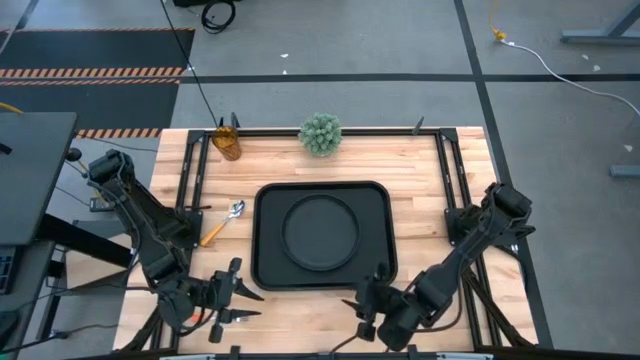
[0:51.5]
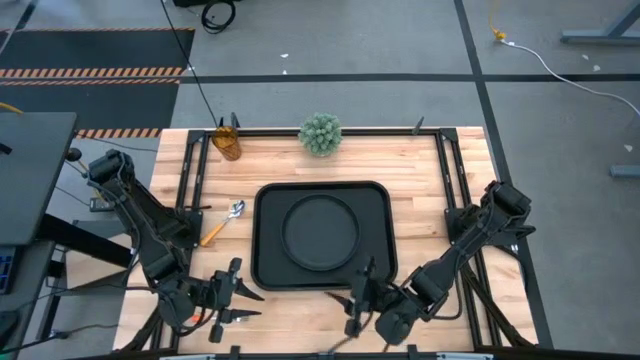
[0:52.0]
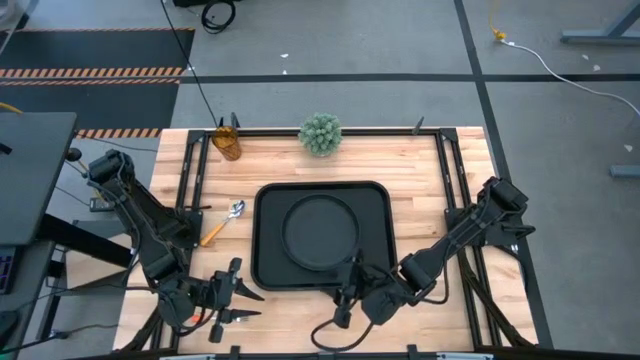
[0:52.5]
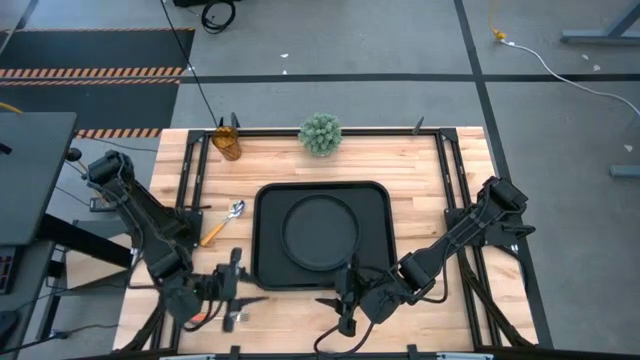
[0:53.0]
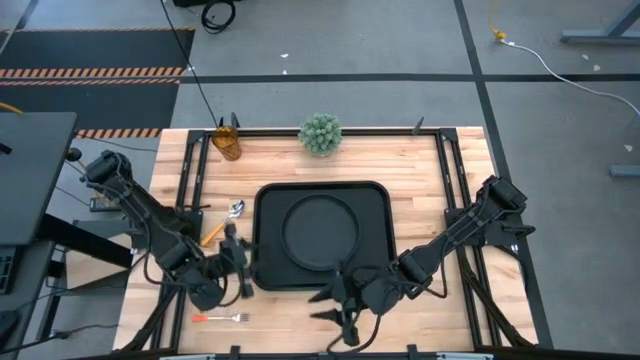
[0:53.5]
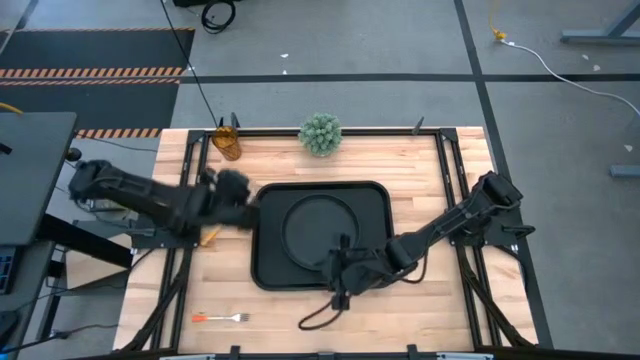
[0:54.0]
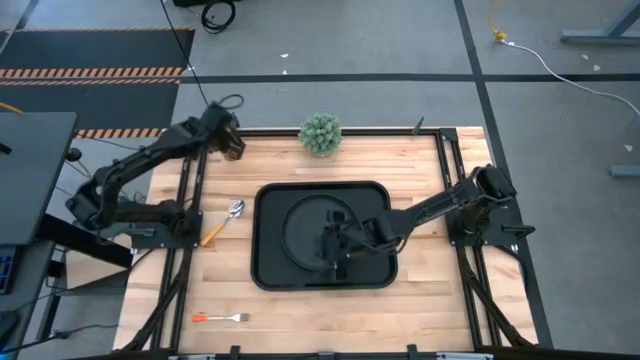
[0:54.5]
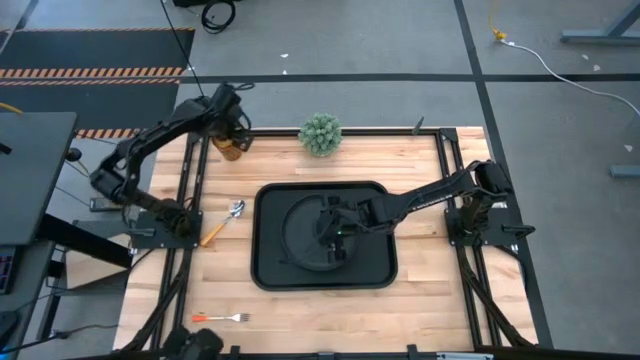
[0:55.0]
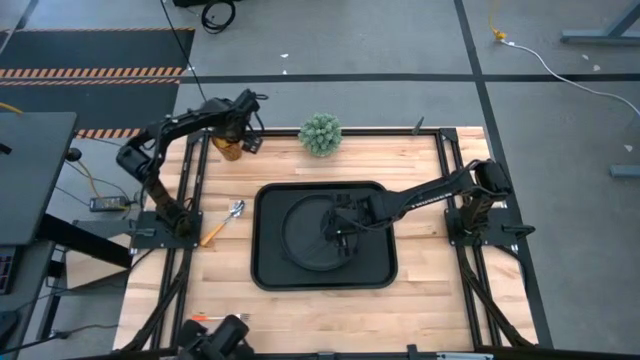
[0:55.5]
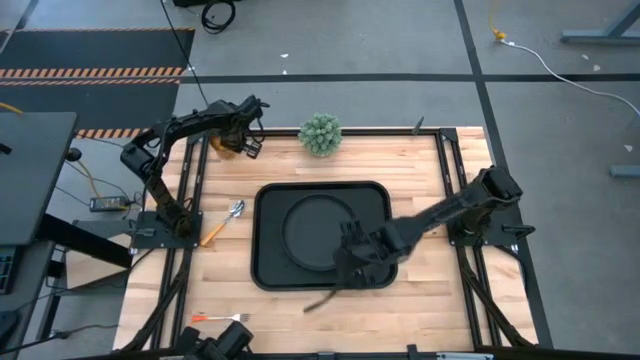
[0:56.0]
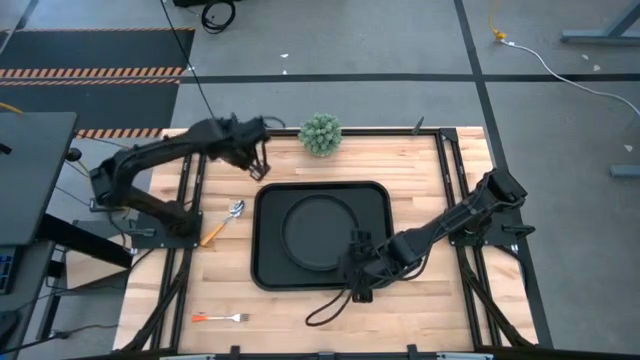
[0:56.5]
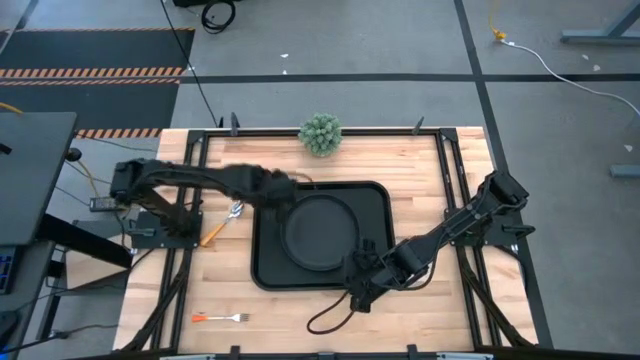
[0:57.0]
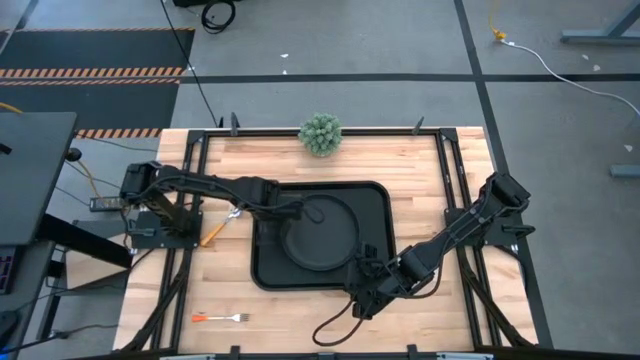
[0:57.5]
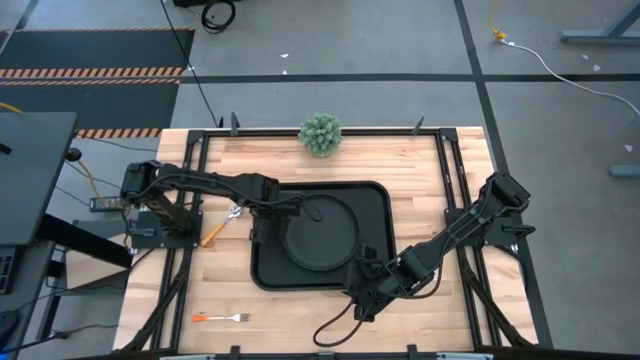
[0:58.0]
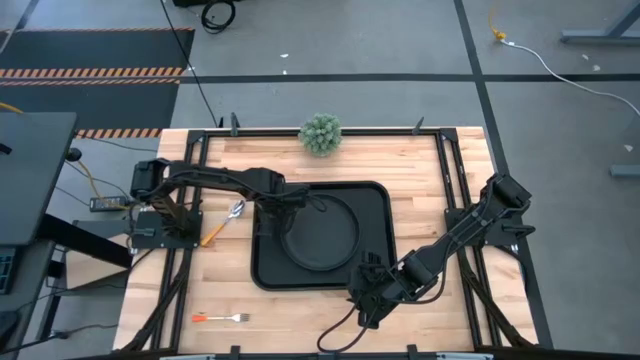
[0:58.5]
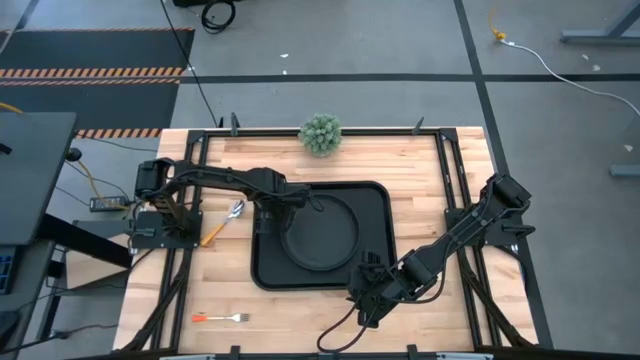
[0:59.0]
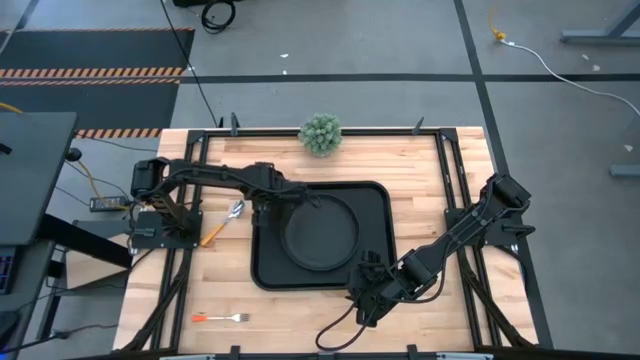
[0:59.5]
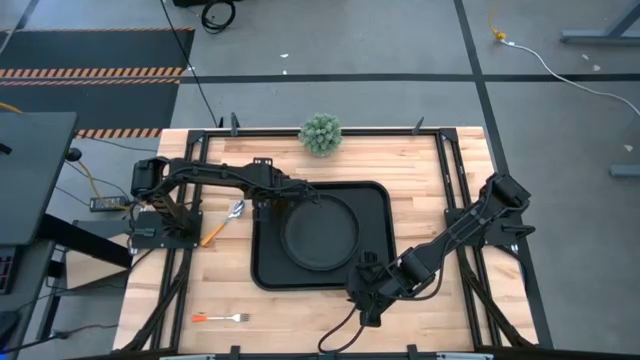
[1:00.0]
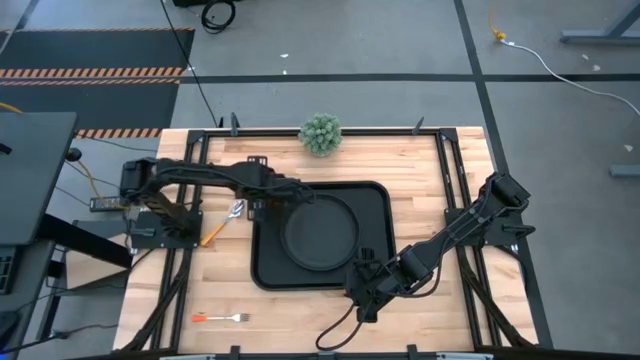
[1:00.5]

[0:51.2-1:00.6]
Task: Pick and place plate/cup/fork/spoon on tray
Put the orange cup on the black tray to the top left of the black plate

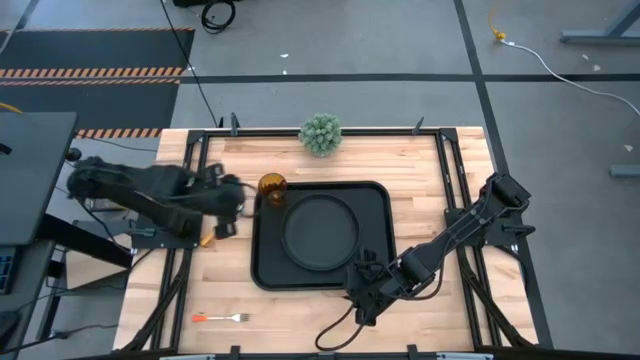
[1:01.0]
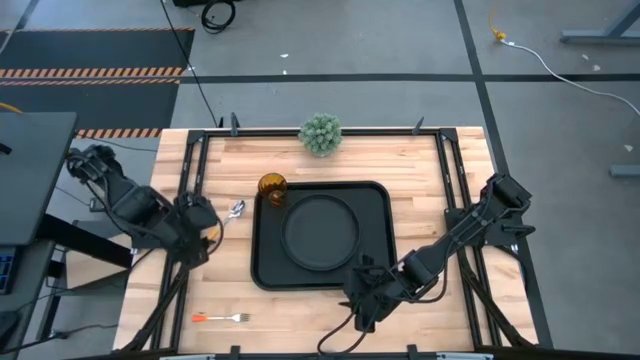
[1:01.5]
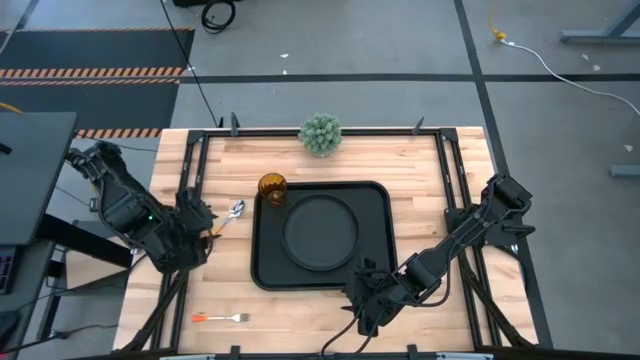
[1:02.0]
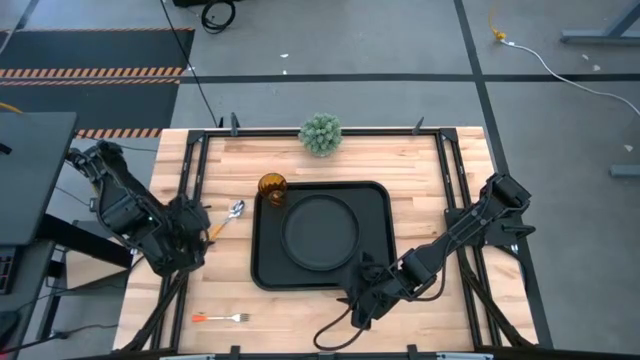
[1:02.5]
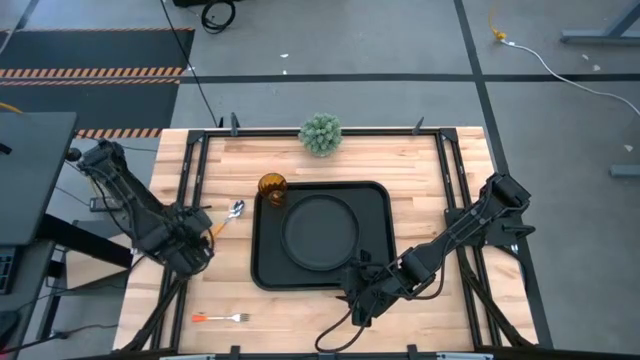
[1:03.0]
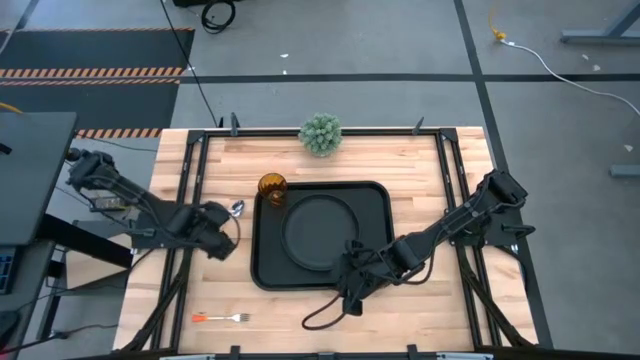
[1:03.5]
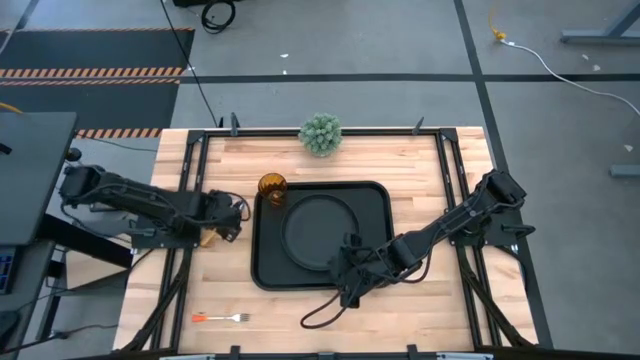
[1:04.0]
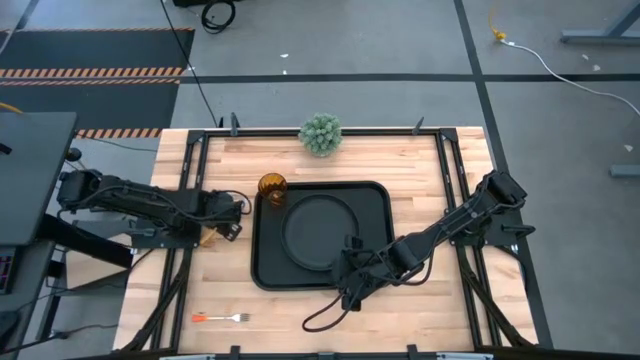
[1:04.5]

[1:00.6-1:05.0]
Put the yellow spoon on the black tray to the left of the black plate

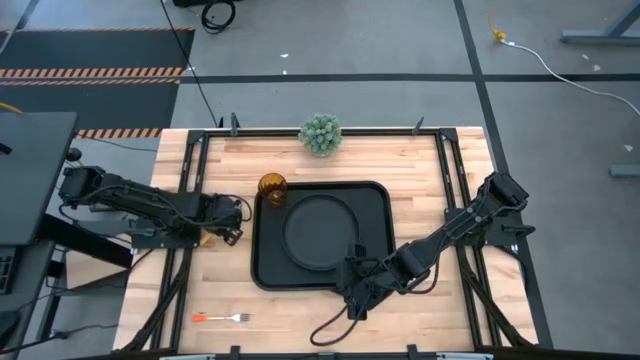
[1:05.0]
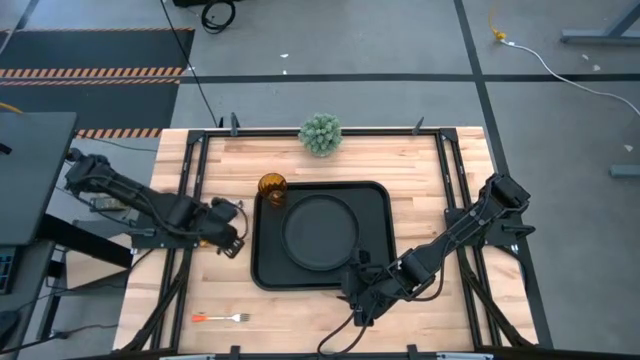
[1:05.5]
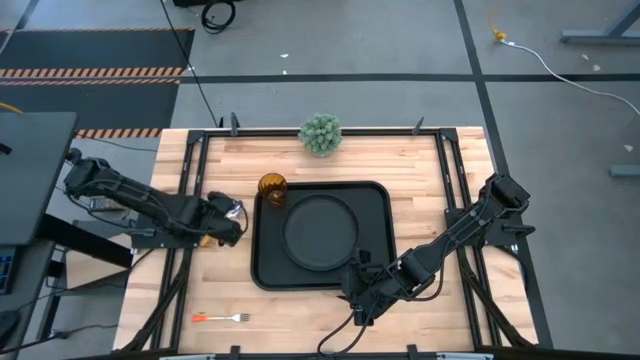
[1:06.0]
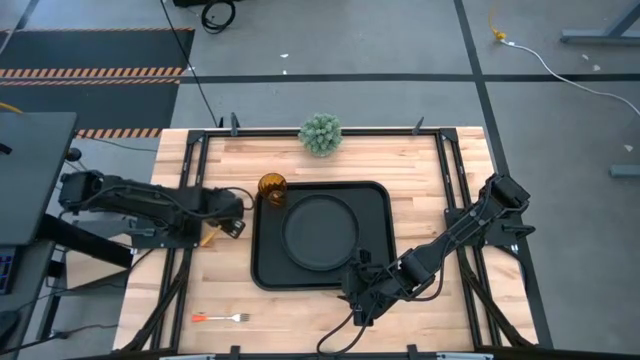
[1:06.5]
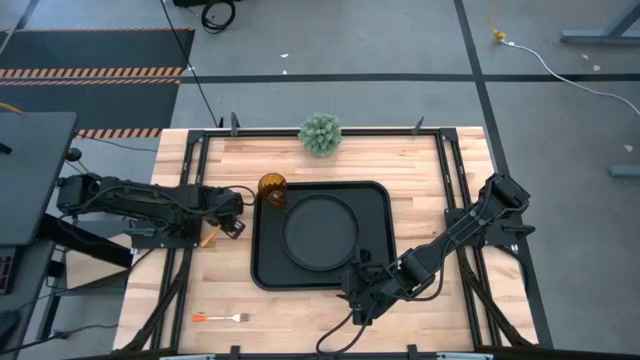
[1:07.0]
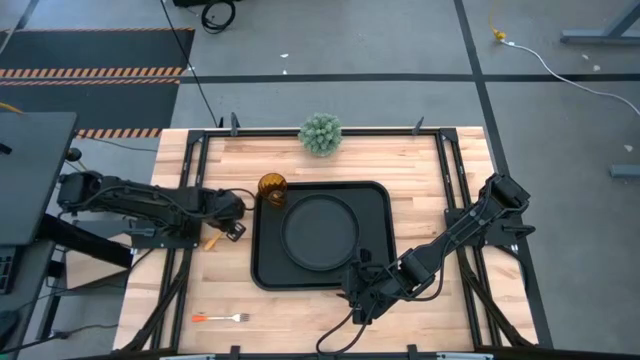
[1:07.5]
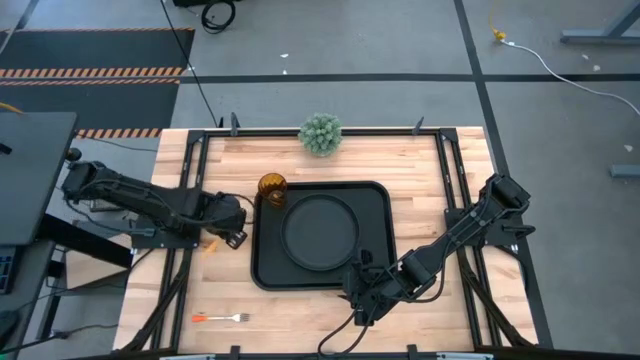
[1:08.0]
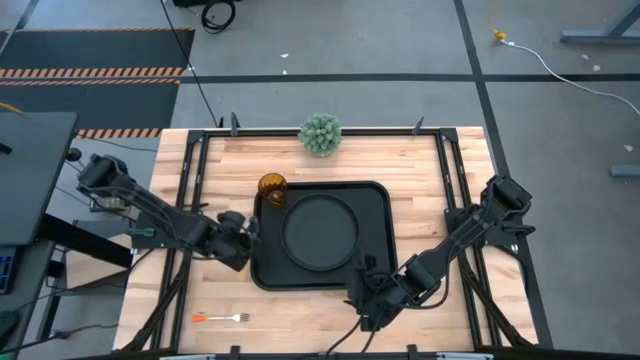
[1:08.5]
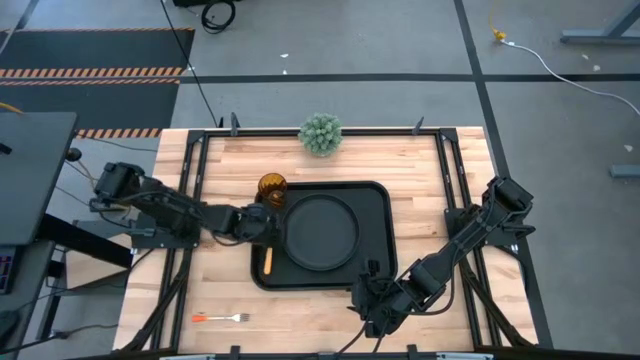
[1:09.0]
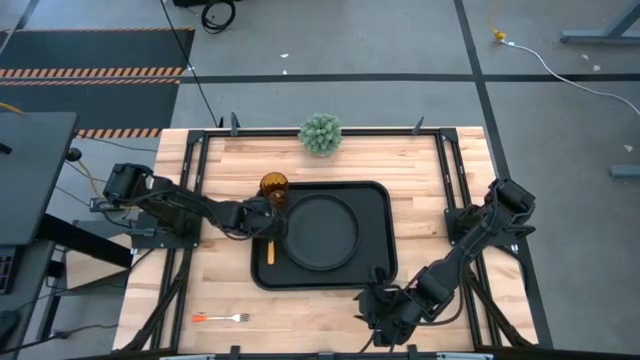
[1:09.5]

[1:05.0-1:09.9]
Put the yellow spoon on the black tray to the left of the black plate

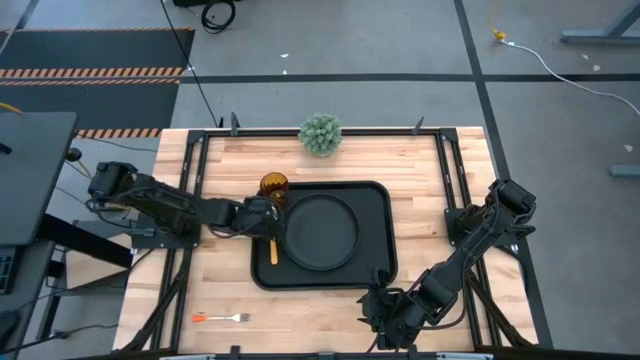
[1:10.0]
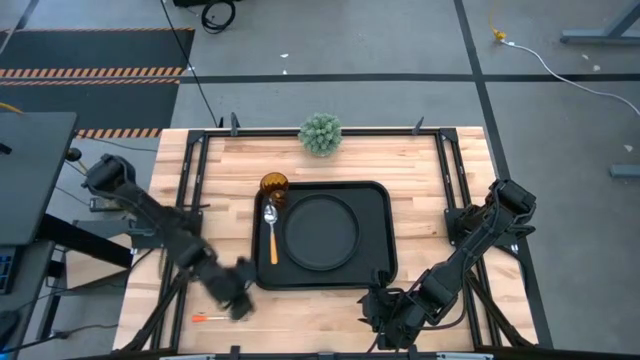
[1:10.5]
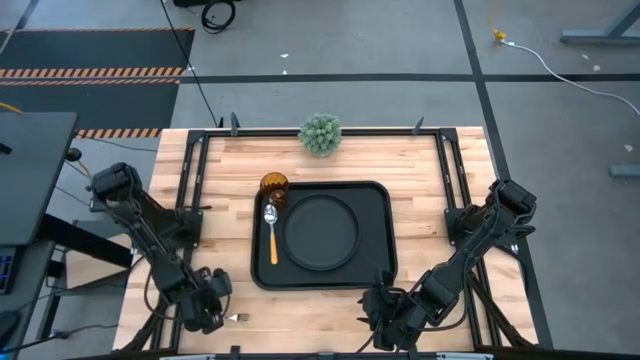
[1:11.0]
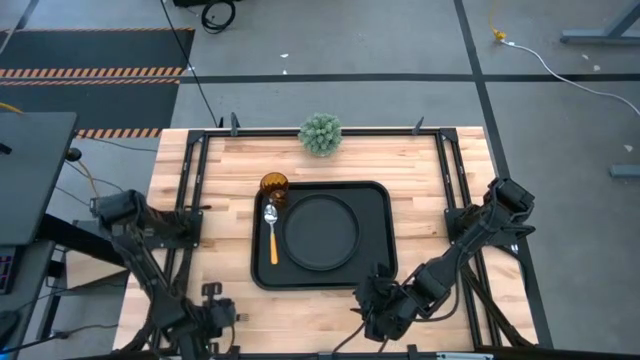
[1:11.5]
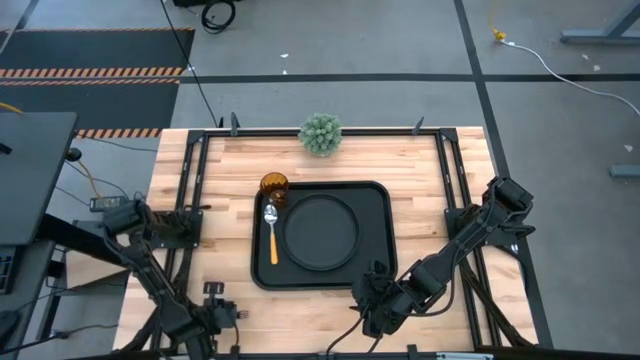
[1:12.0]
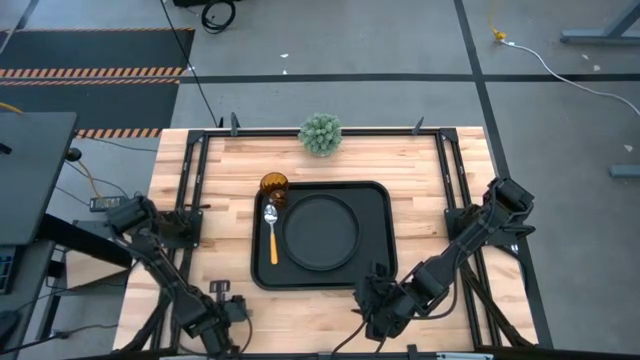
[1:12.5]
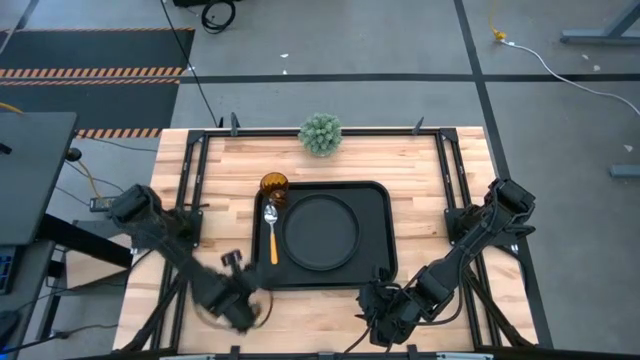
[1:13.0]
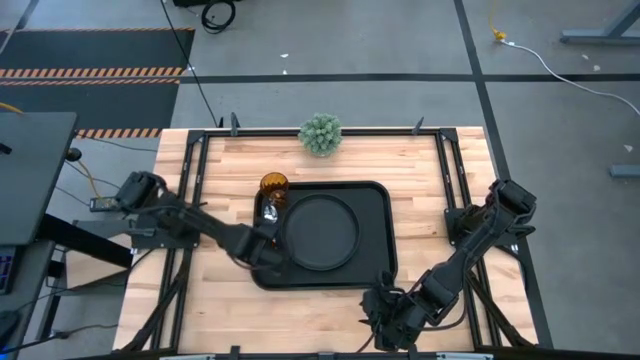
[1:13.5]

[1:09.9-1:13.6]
Put the orange fork on the black tray to the left of the yellow spoon
